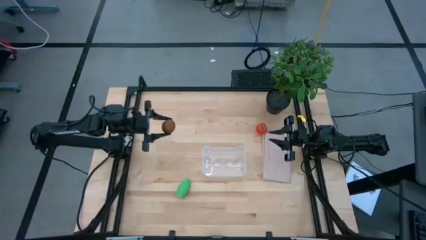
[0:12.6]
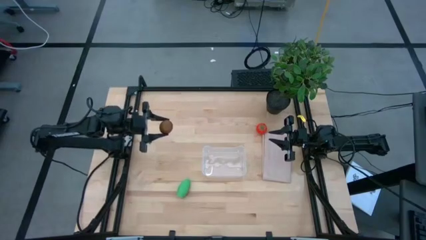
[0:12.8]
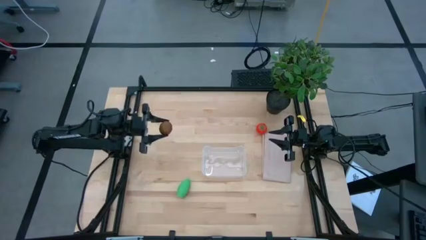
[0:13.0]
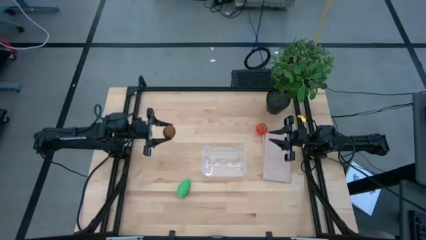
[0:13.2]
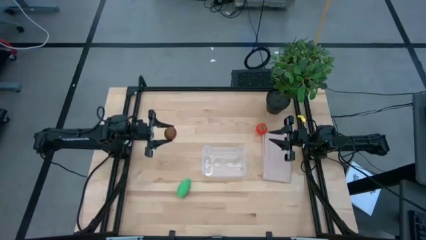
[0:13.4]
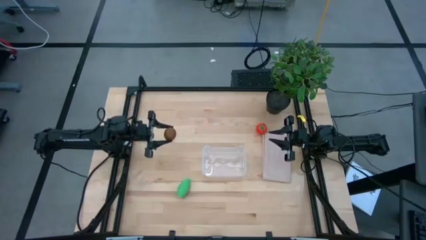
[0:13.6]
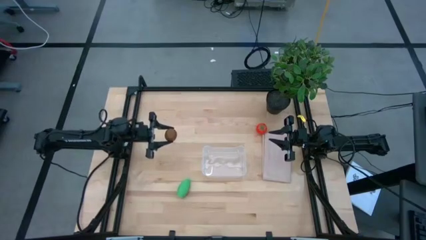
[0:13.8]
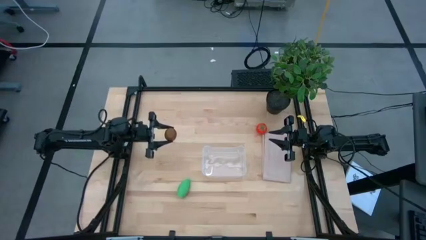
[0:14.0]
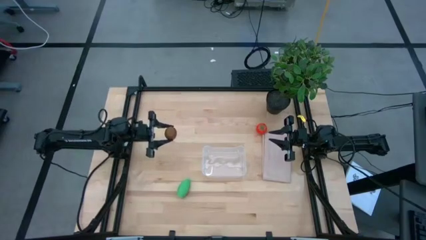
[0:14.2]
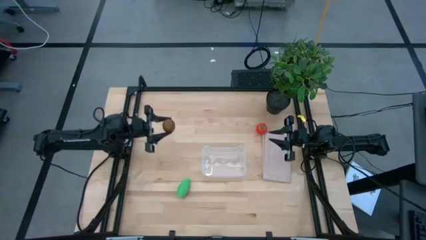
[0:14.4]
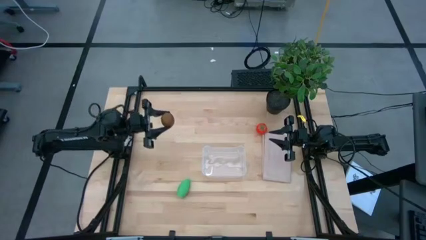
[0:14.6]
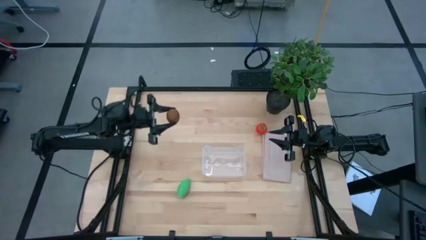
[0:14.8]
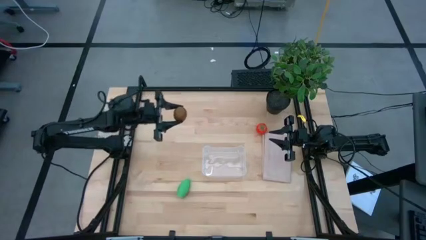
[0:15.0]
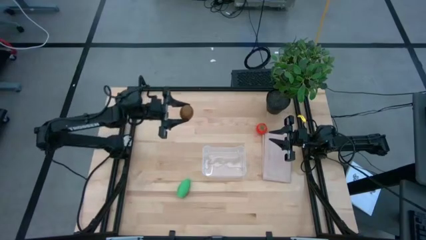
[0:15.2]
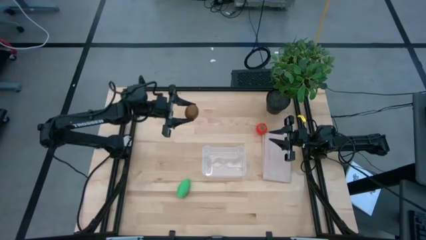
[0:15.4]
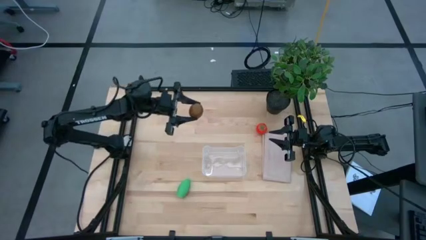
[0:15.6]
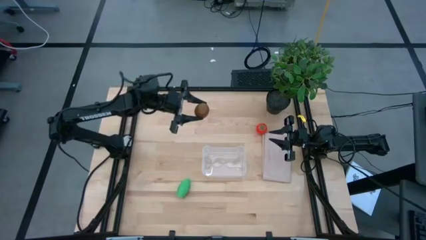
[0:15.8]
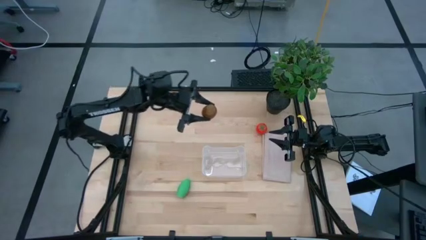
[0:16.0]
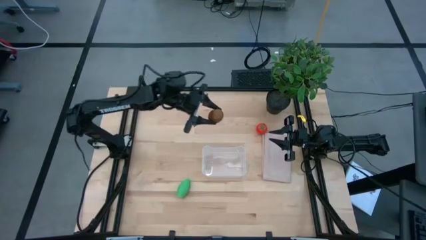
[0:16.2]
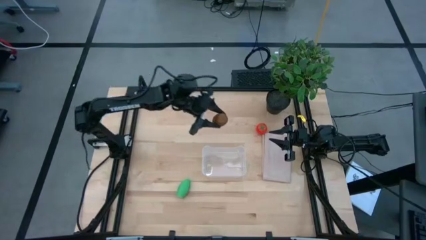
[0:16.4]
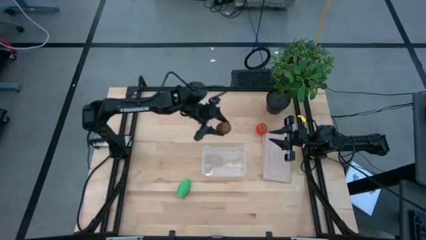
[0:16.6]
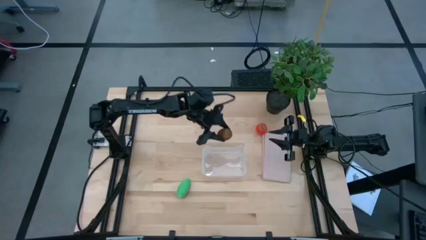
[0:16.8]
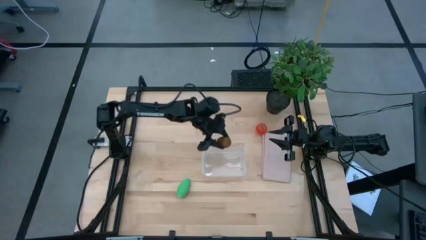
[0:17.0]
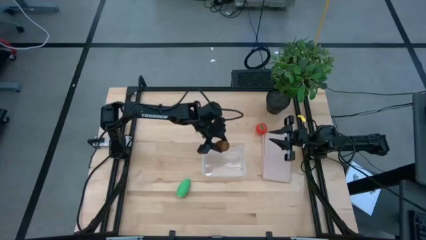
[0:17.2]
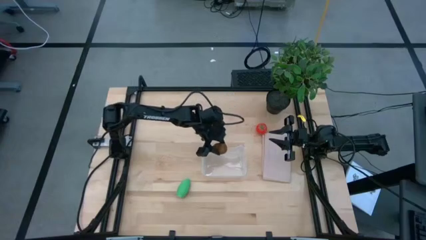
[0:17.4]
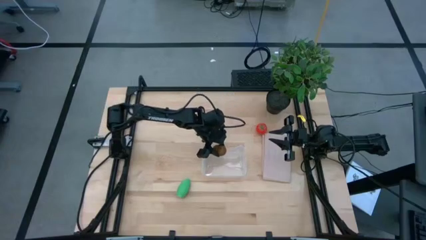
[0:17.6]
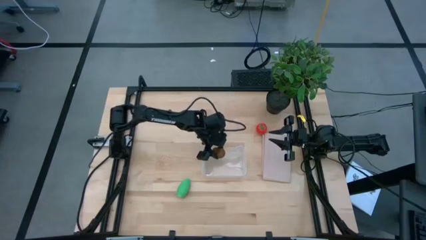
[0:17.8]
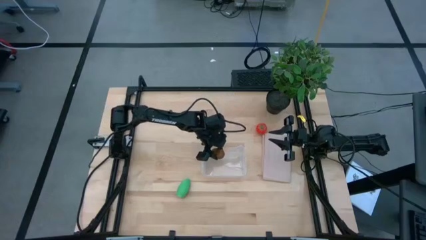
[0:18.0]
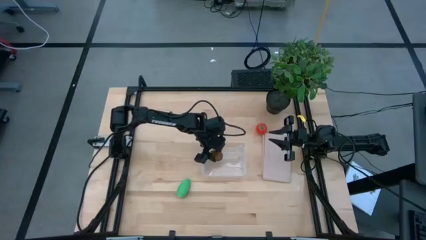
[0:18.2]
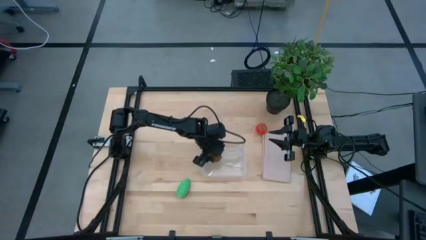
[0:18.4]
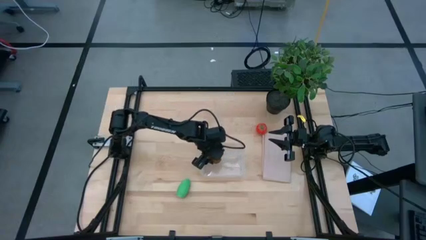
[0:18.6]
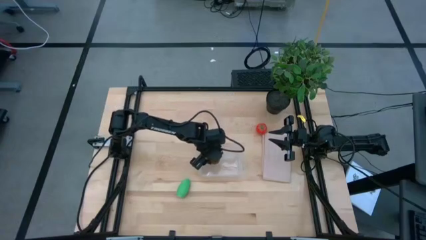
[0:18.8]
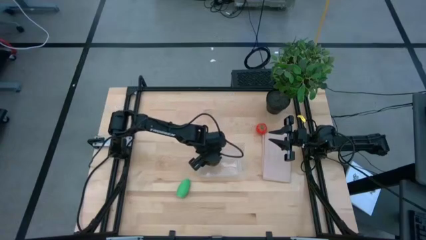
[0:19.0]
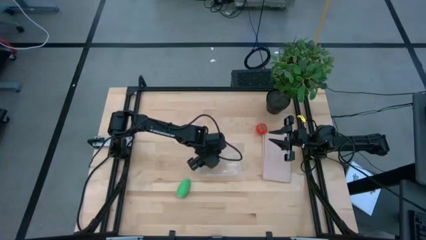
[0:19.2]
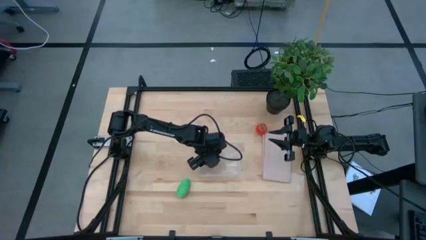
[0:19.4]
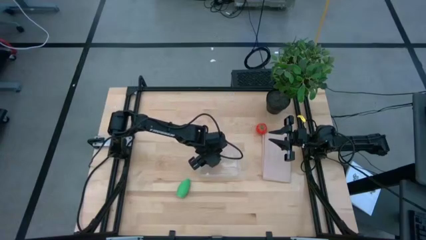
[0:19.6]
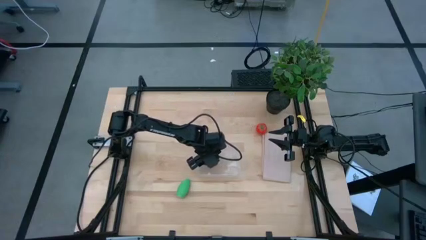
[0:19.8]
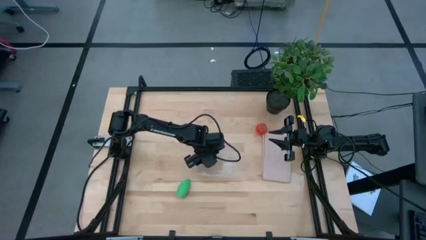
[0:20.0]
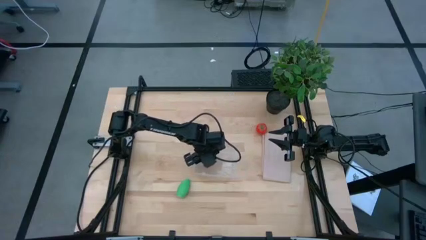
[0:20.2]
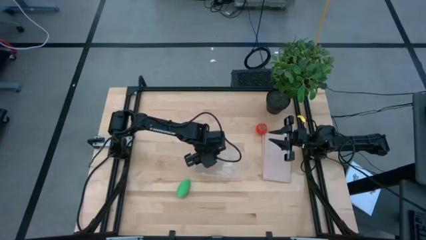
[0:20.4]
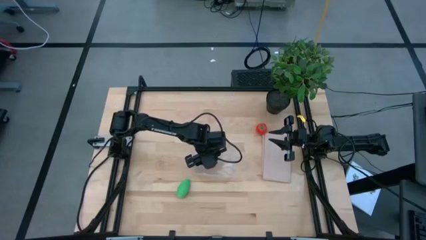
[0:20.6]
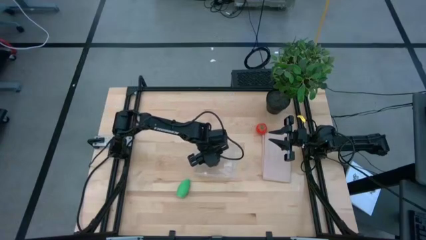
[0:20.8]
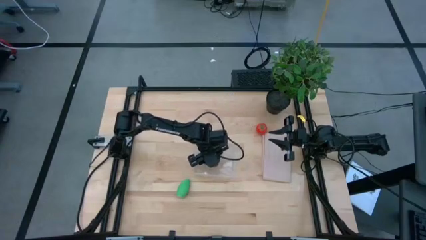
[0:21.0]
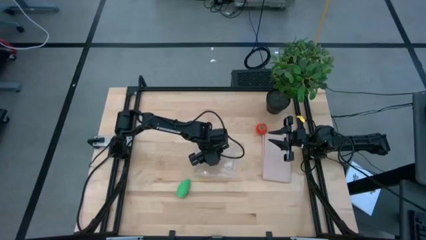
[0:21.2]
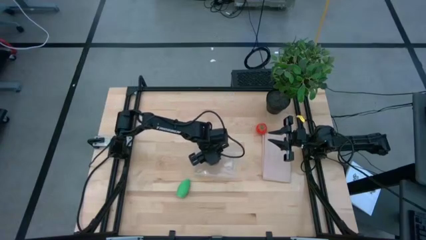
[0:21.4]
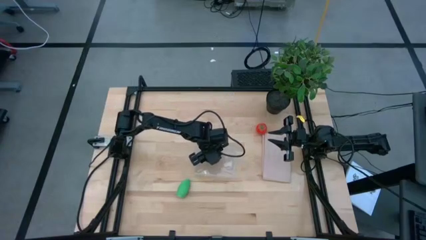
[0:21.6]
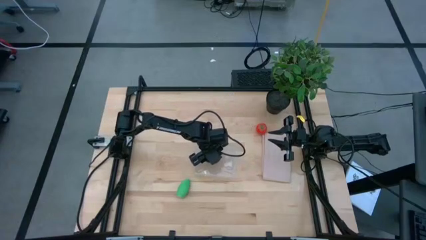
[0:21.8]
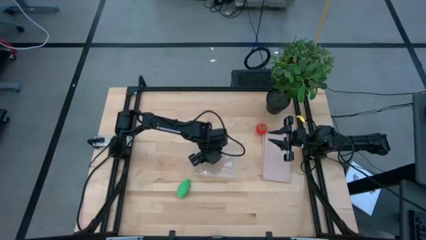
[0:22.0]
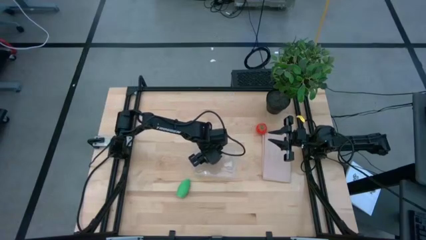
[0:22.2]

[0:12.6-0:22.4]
Task: Pick and placing Produce into tupperware
Put the kiwi into the transparent bin

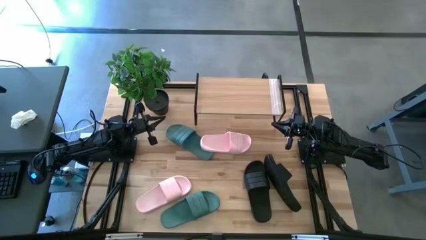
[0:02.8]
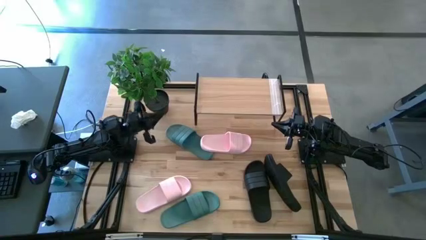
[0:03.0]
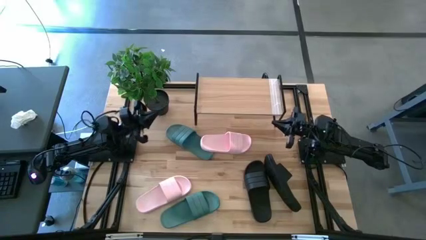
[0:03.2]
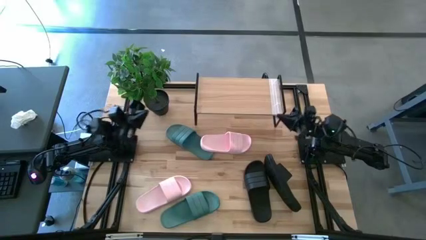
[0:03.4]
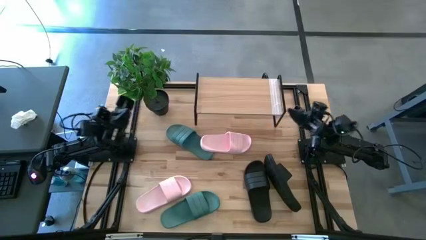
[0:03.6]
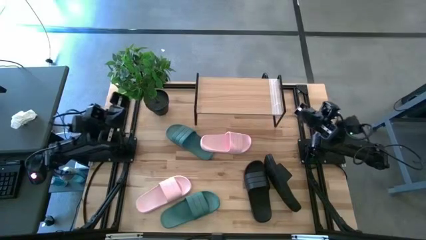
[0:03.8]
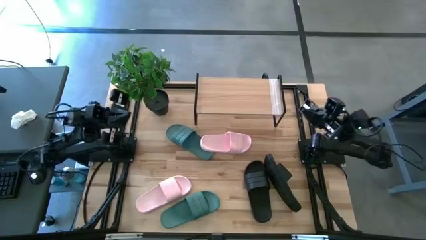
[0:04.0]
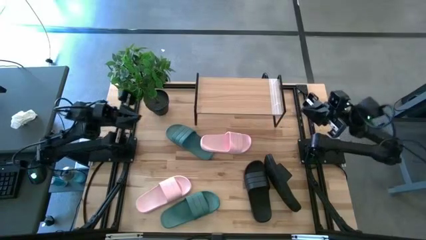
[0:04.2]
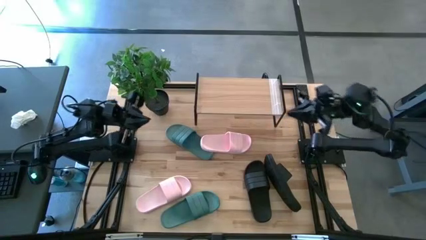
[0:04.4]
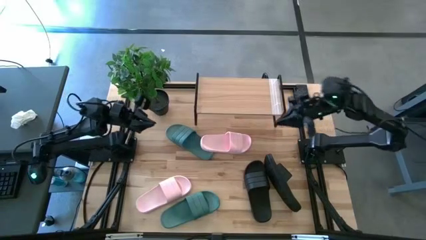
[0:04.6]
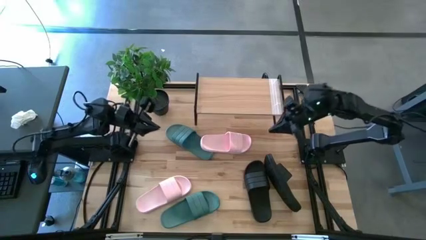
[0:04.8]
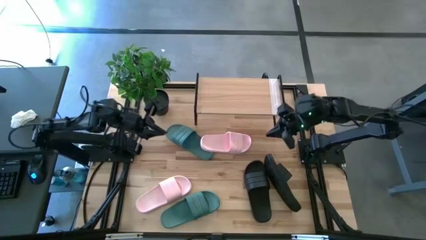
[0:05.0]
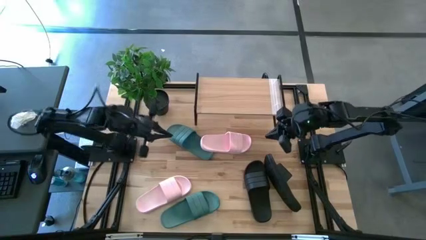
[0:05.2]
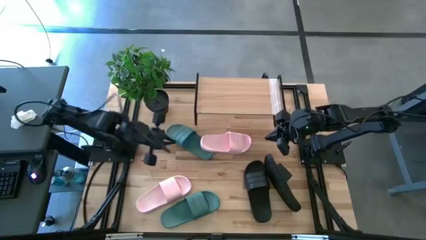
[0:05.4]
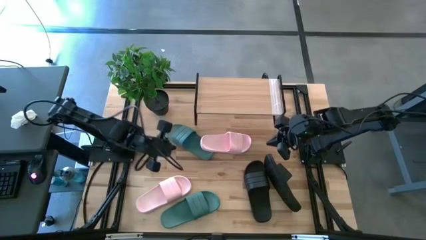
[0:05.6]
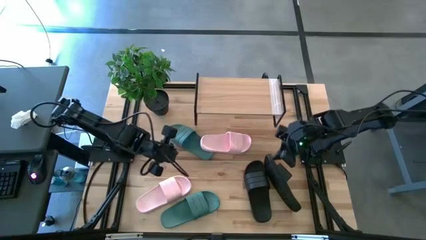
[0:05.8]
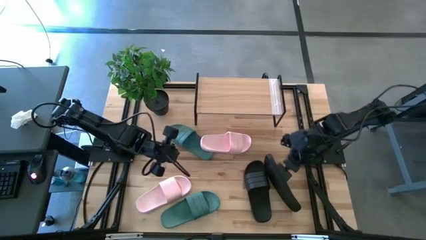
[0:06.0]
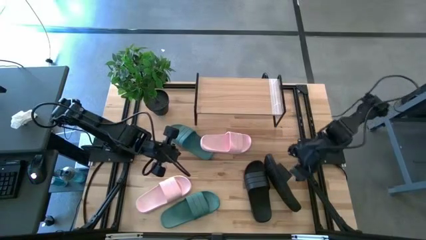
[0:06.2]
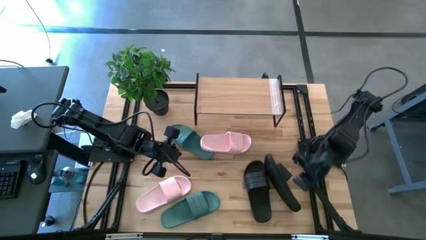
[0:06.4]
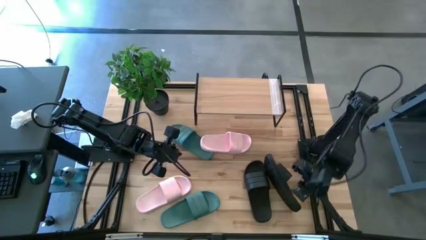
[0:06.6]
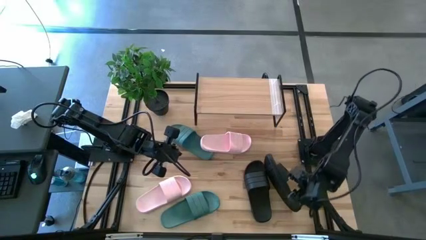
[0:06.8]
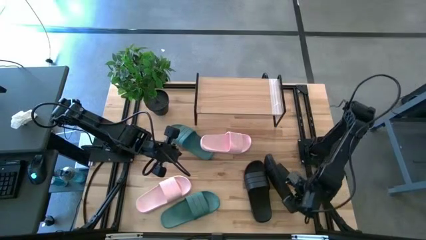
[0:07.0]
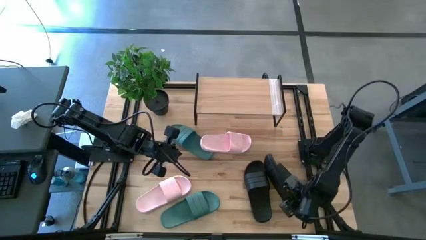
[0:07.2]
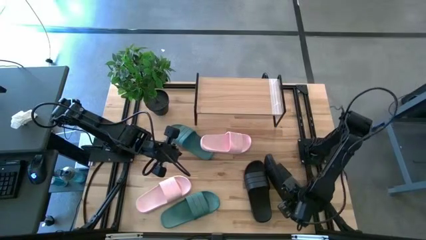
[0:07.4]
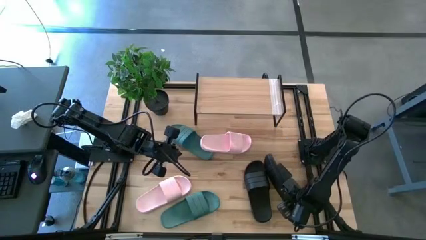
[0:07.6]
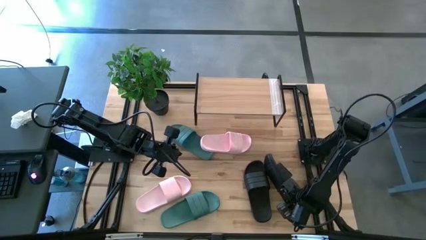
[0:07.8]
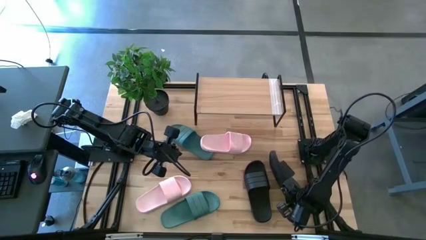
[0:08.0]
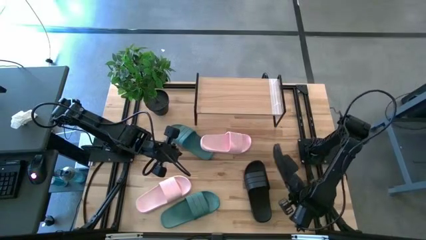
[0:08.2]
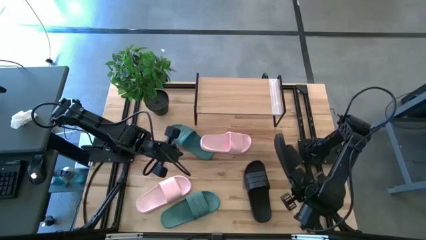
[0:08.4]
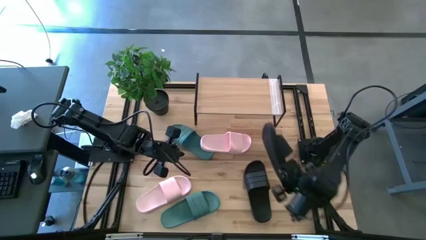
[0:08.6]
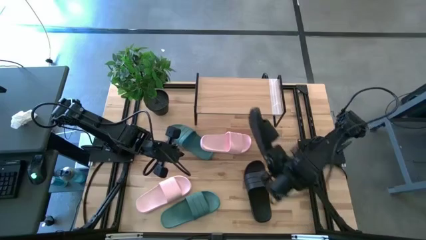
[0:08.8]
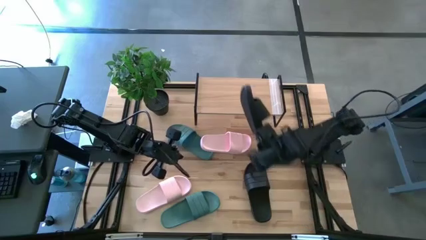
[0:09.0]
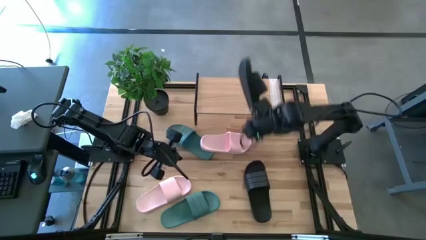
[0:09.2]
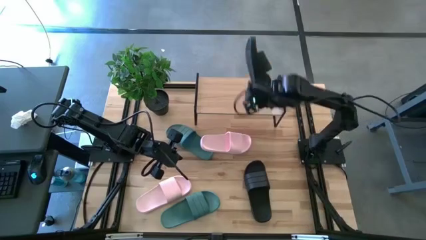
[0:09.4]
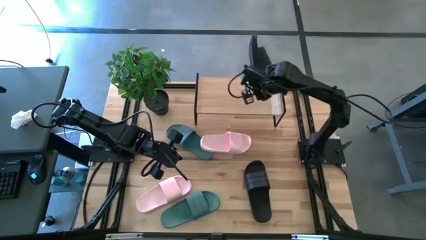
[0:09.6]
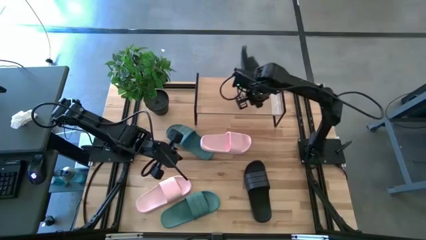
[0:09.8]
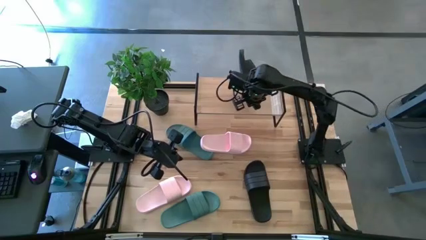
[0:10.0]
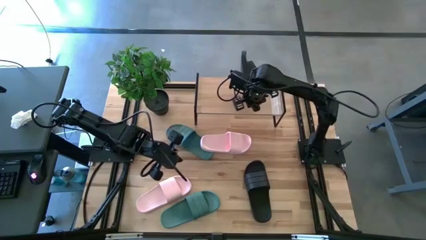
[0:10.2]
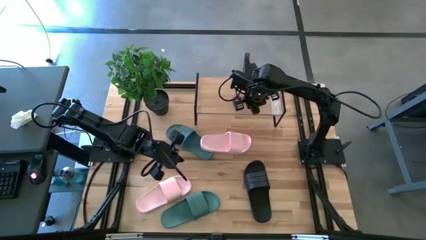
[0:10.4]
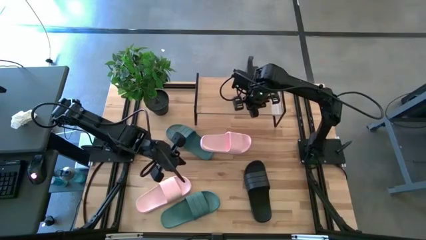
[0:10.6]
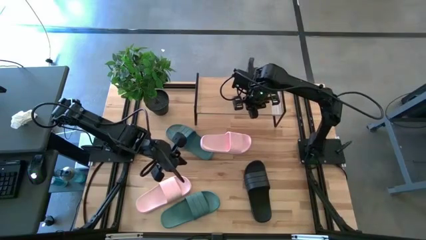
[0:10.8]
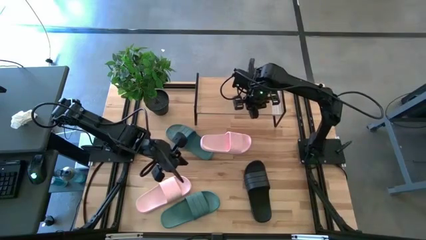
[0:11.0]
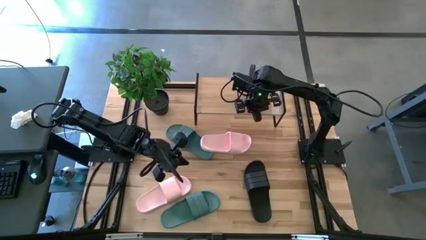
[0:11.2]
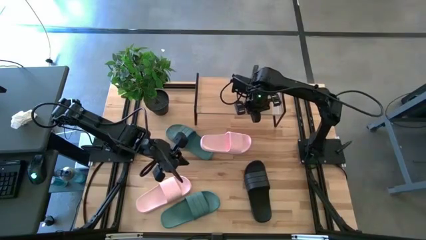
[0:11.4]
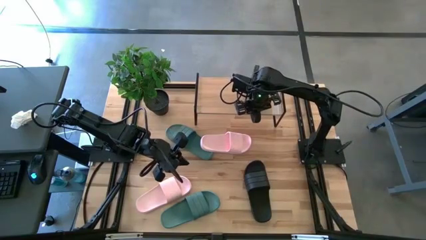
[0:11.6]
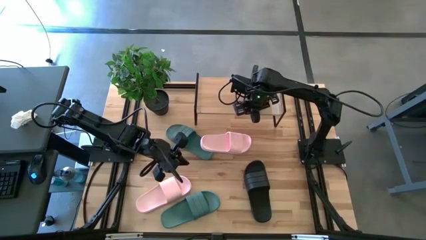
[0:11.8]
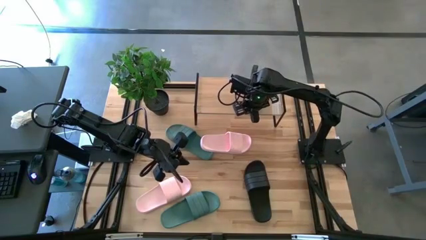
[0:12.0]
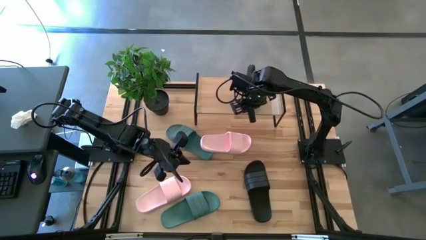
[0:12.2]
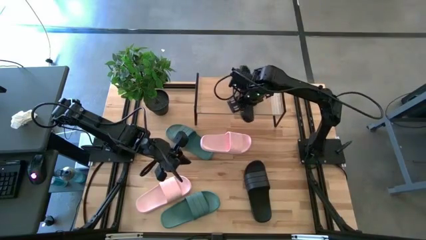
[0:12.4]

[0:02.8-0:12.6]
Task: Pick and place slides into the shelf
Put the right black slipper on the shelf
